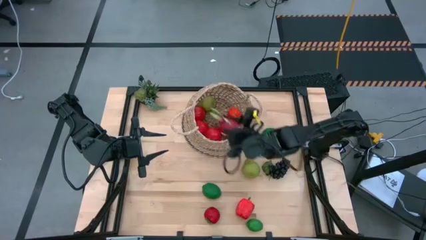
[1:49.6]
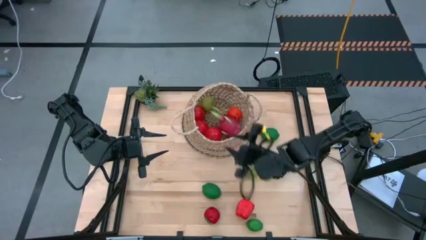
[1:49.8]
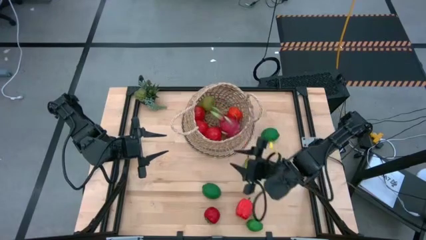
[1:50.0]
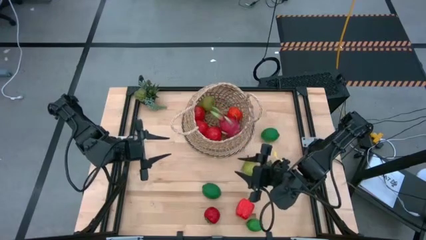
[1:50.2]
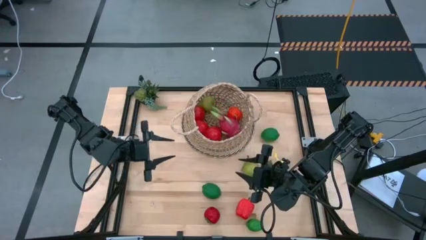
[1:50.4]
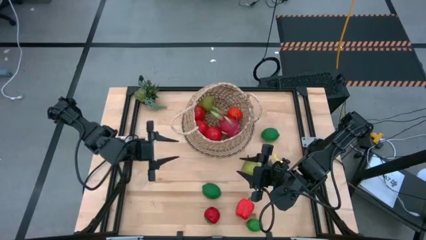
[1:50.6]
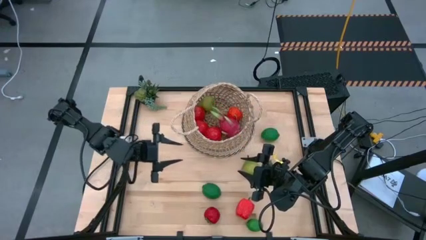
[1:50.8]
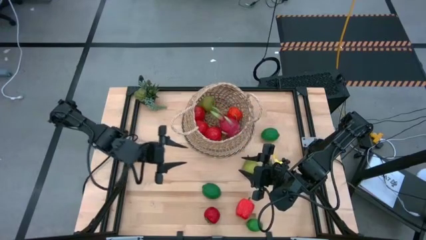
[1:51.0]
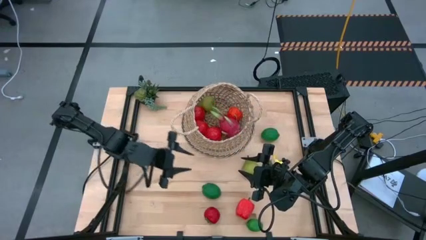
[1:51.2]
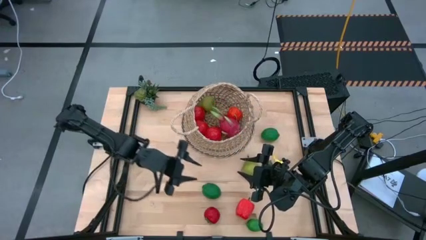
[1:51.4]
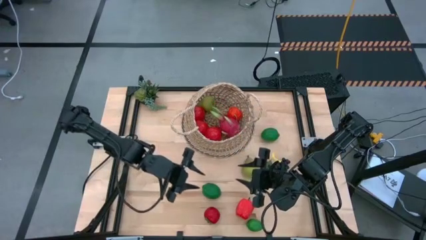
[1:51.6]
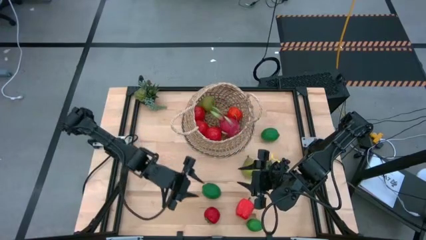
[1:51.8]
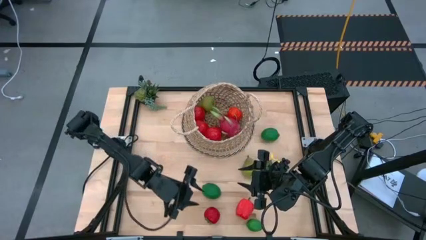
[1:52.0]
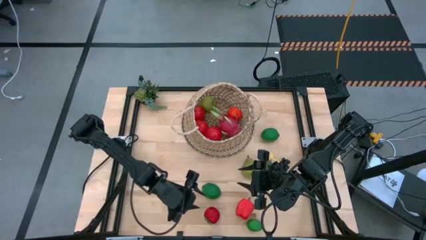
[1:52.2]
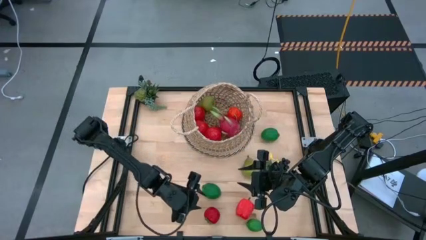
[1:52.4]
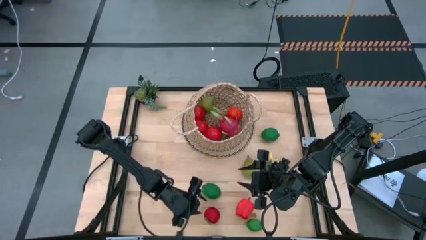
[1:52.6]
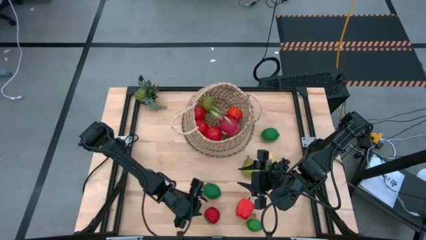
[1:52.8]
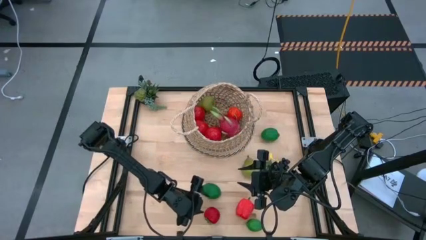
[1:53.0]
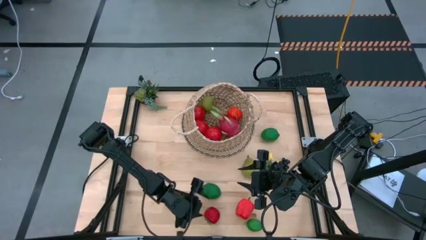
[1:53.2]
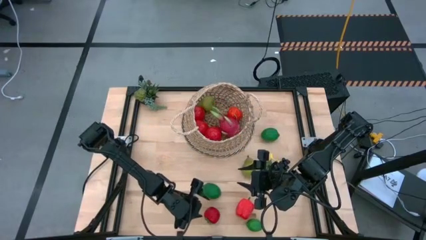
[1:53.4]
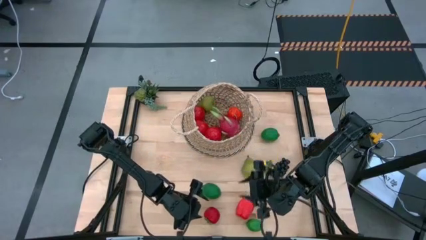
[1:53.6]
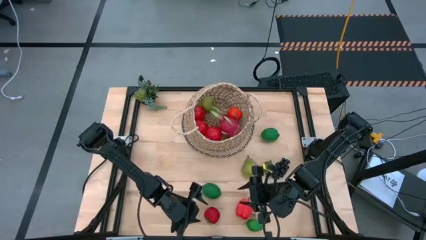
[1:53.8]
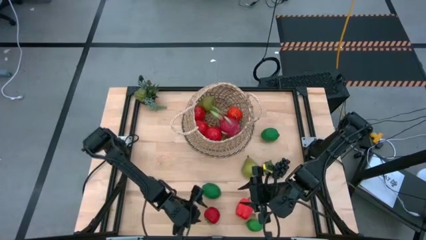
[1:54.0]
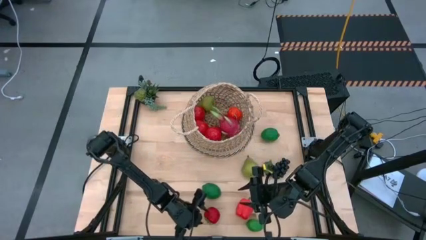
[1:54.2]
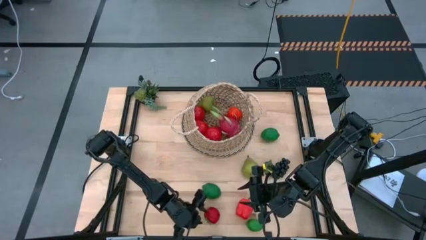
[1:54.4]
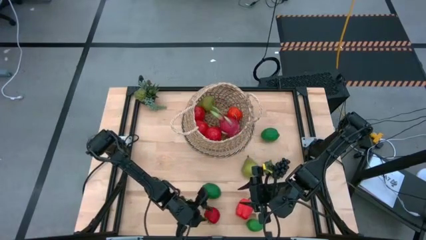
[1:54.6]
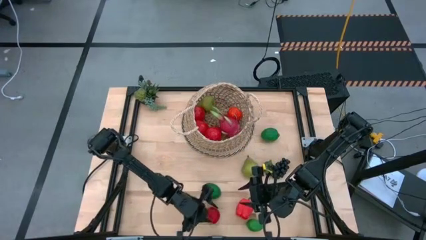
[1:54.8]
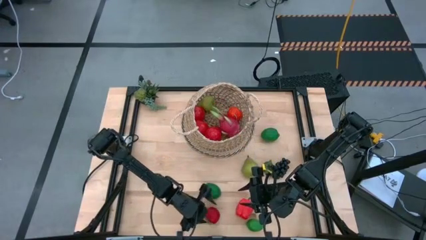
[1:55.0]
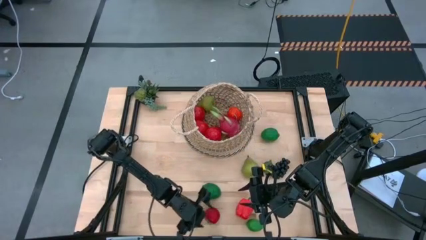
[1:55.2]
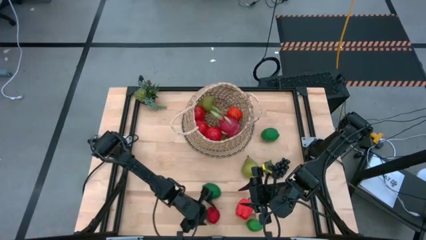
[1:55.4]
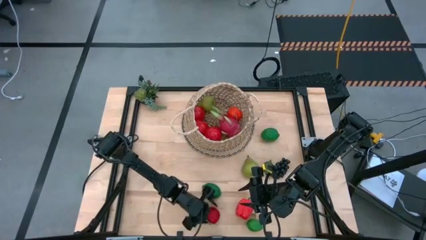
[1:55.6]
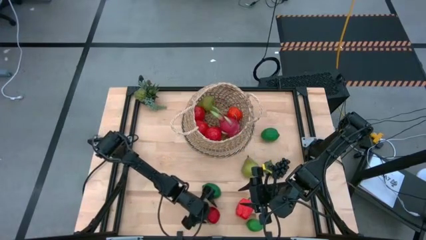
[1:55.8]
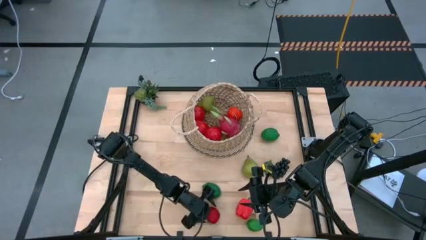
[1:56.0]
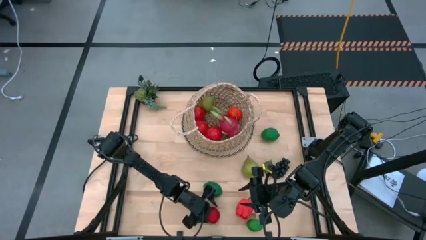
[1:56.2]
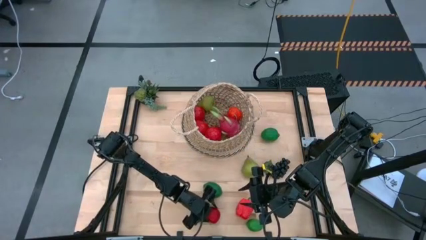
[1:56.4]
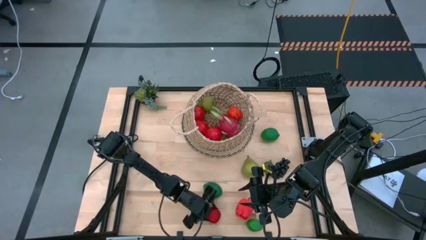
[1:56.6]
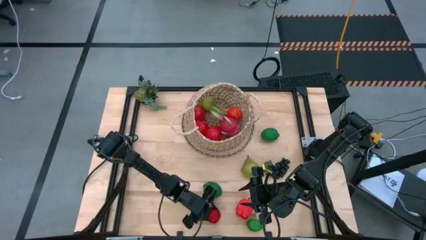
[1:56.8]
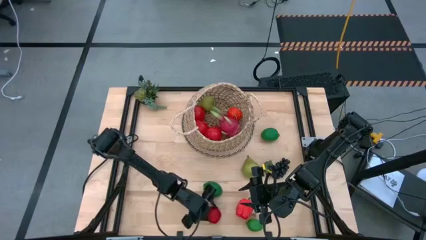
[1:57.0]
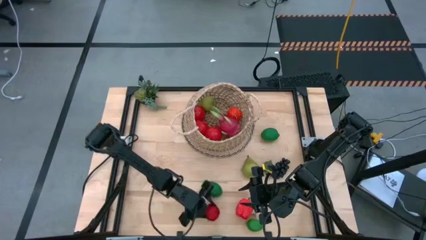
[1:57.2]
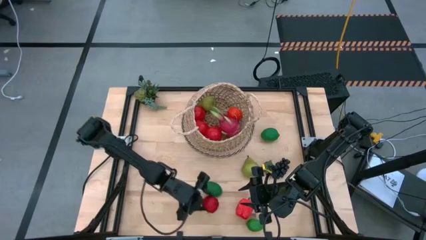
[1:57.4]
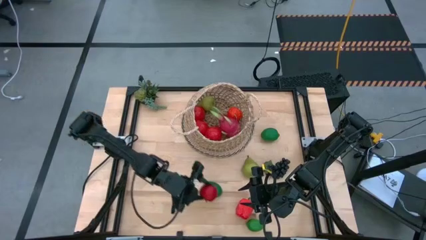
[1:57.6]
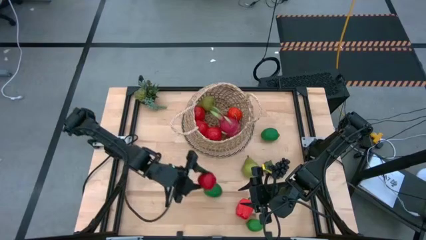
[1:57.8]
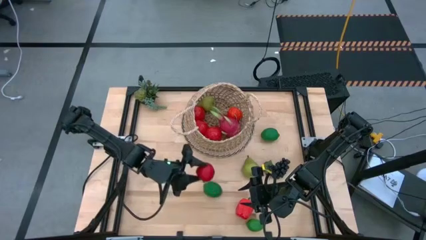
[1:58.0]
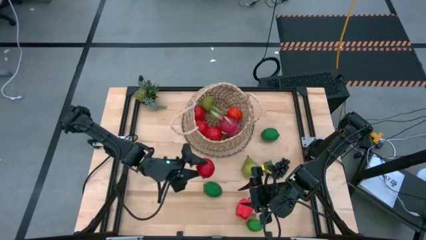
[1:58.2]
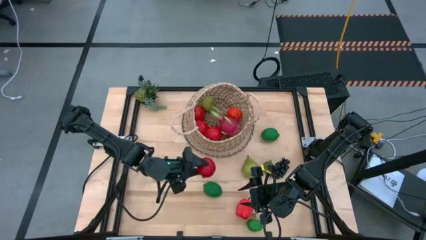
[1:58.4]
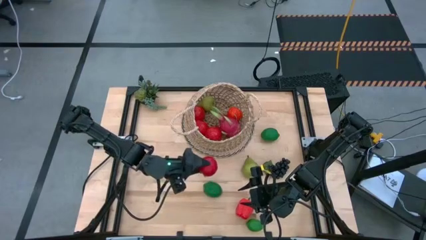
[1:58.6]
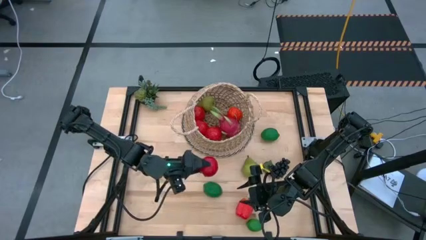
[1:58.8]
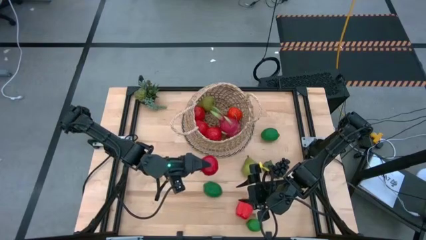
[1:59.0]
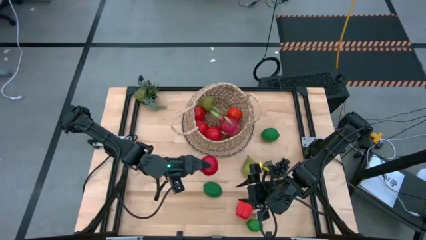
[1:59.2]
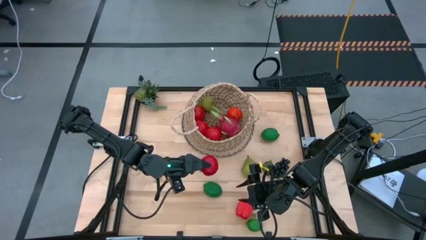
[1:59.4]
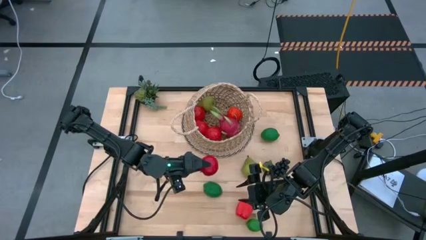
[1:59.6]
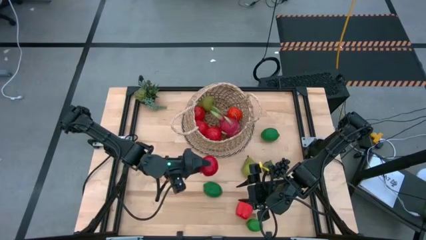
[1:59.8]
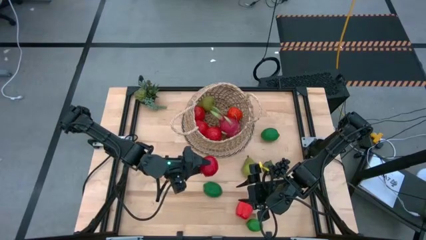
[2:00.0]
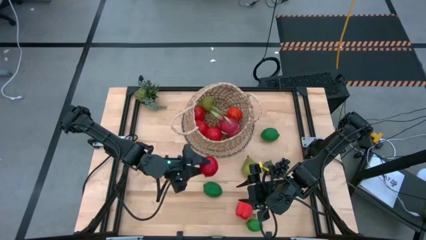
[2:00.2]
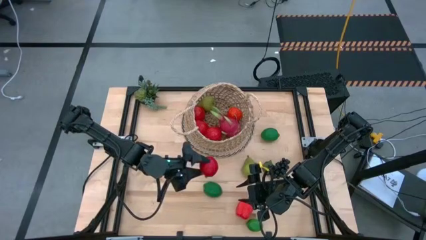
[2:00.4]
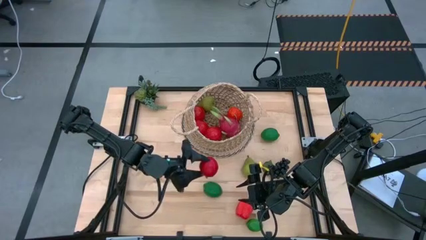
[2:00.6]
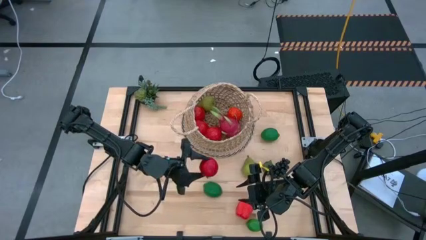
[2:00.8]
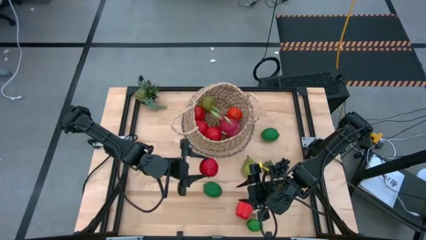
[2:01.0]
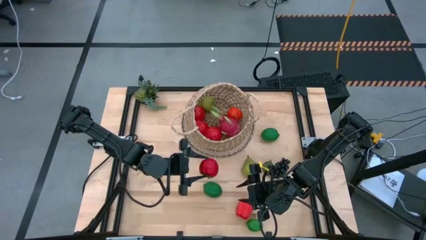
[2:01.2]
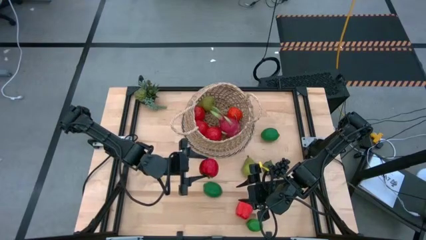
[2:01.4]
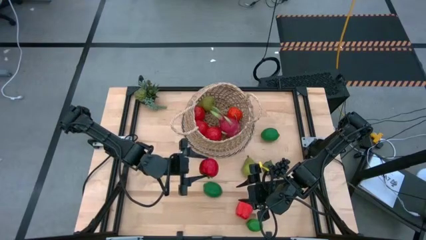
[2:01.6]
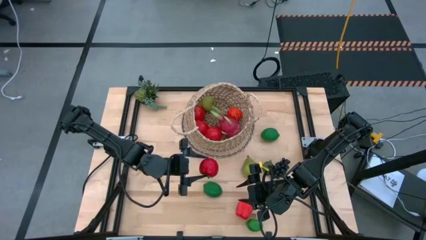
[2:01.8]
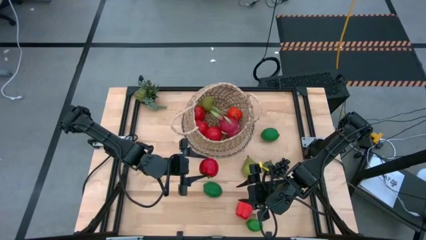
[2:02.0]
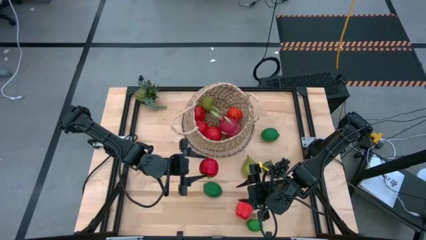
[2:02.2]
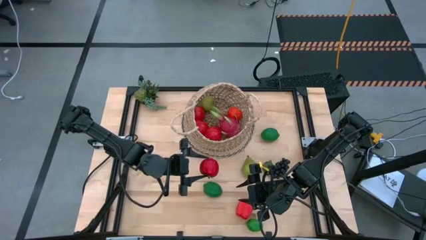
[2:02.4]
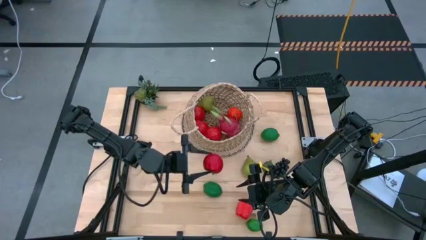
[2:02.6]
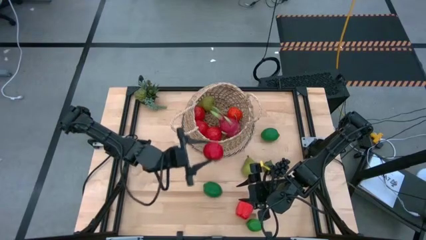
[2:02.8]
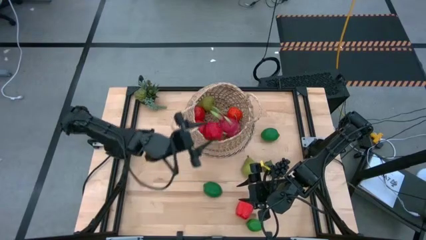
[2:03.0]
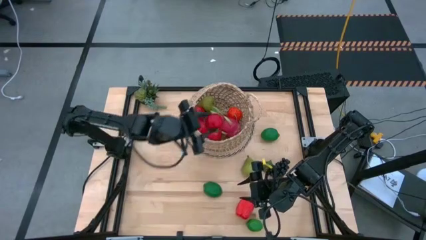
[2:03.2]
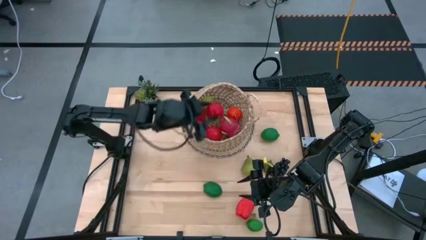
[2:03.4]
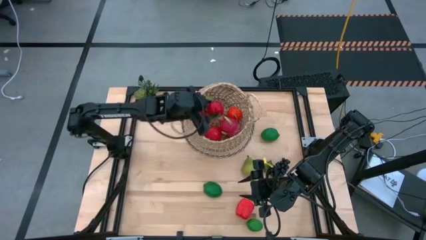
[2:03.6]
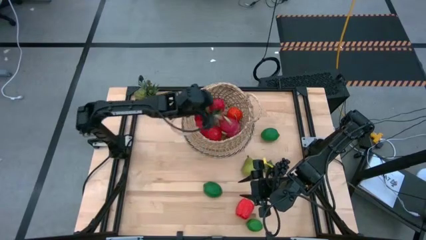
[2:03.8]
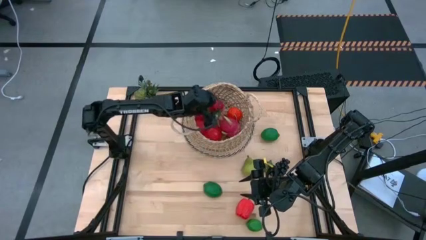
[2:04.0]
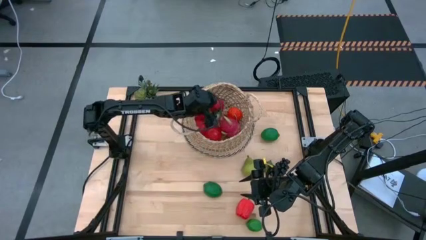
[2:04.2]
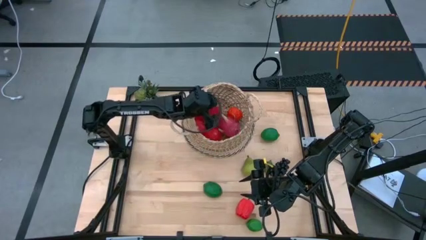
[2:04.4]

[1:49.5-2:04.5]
Task: Build produce basket
Put the red tomato into the basket
